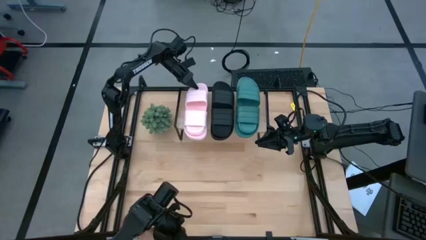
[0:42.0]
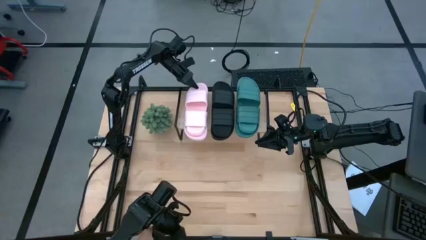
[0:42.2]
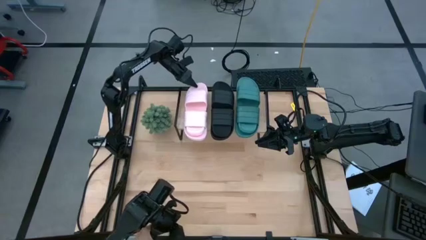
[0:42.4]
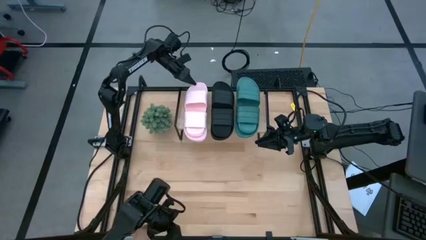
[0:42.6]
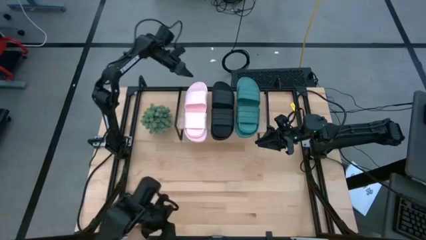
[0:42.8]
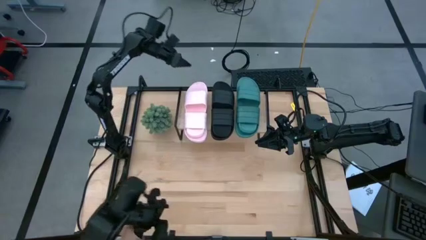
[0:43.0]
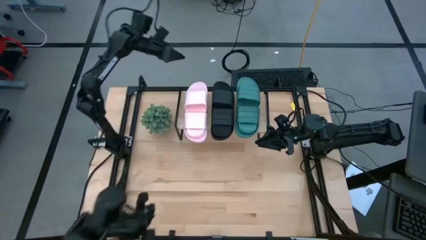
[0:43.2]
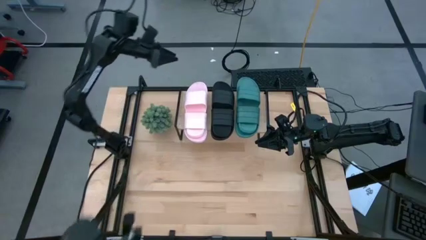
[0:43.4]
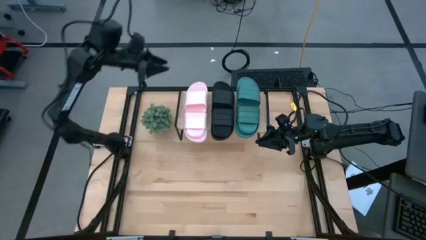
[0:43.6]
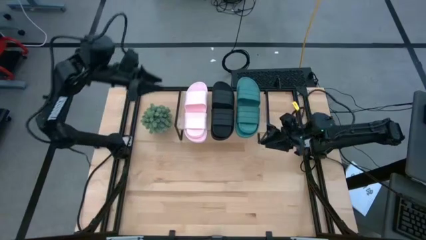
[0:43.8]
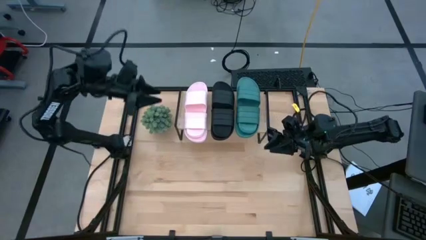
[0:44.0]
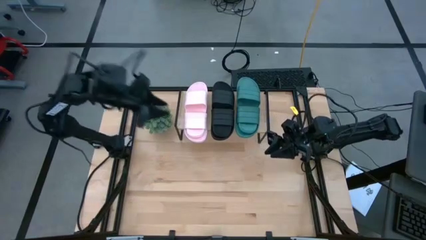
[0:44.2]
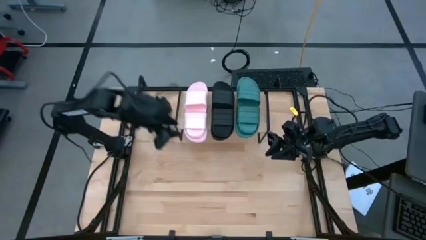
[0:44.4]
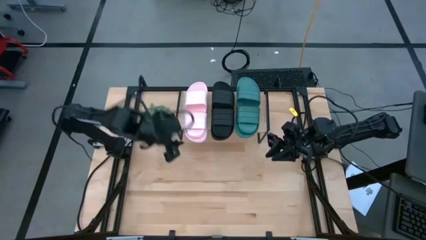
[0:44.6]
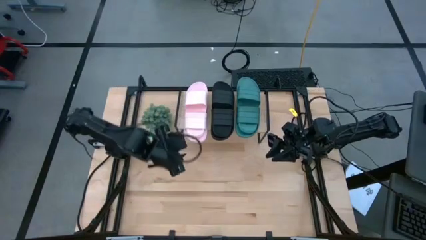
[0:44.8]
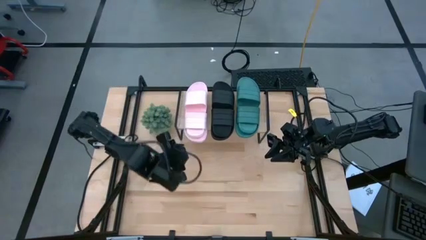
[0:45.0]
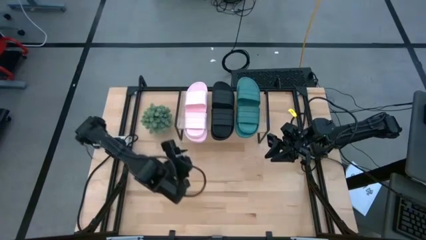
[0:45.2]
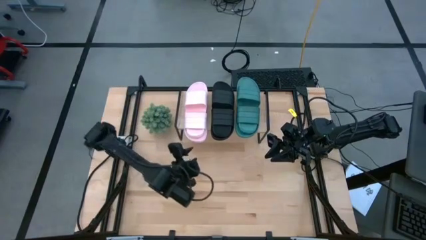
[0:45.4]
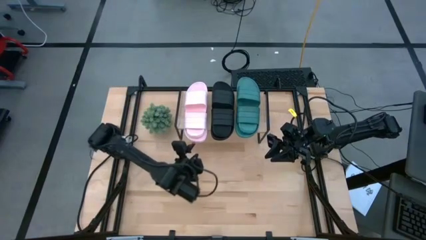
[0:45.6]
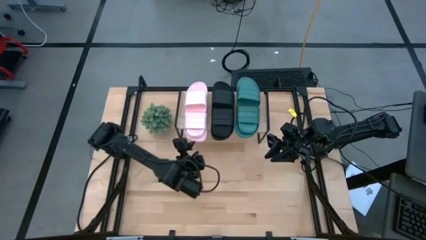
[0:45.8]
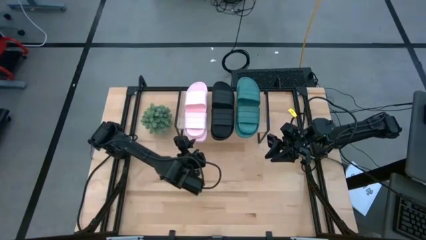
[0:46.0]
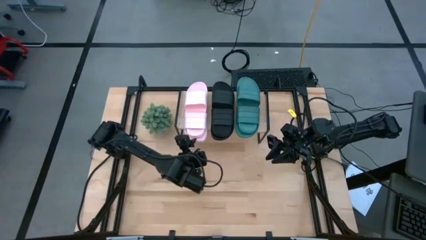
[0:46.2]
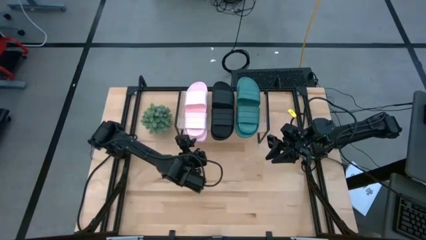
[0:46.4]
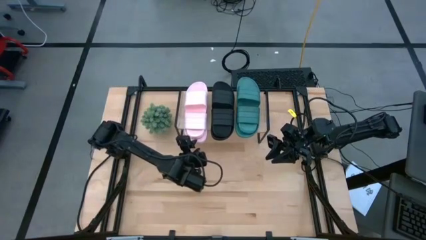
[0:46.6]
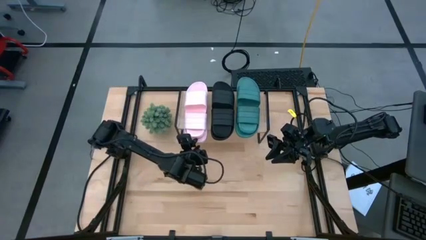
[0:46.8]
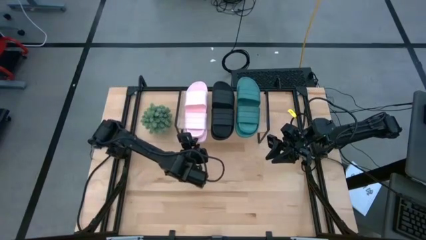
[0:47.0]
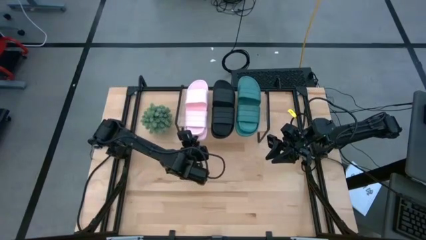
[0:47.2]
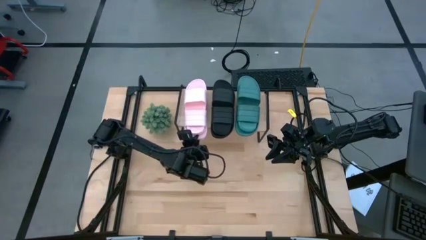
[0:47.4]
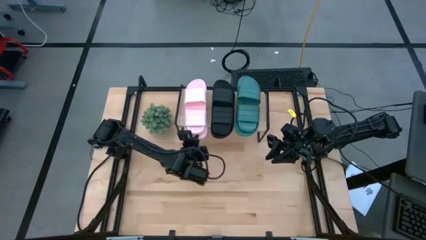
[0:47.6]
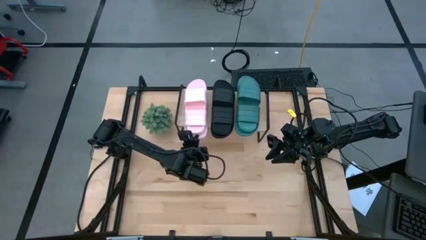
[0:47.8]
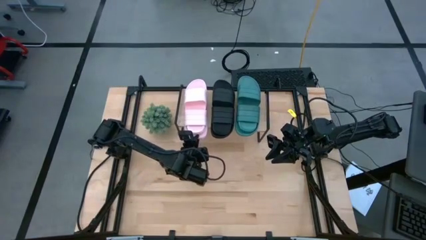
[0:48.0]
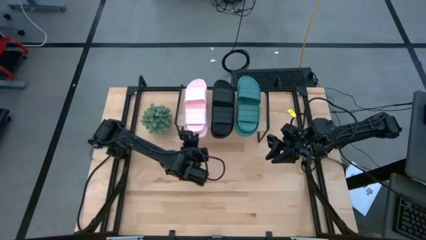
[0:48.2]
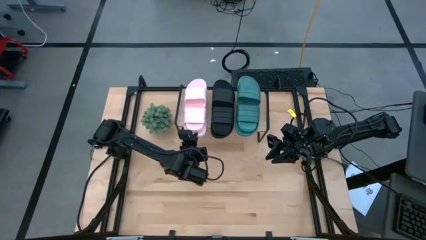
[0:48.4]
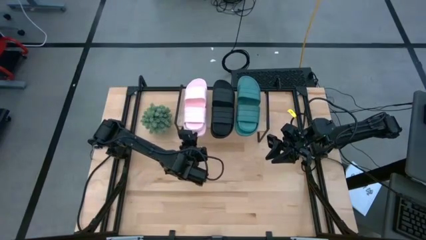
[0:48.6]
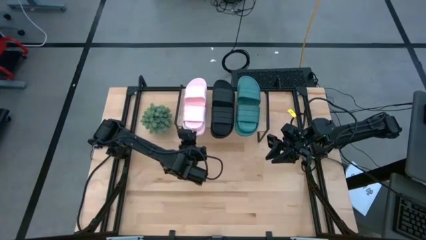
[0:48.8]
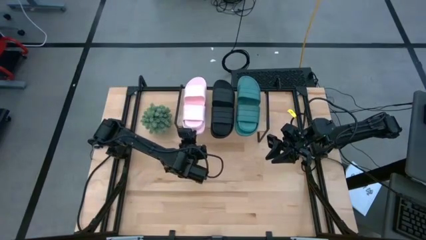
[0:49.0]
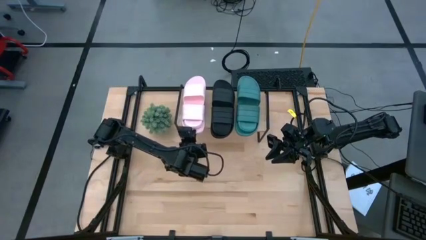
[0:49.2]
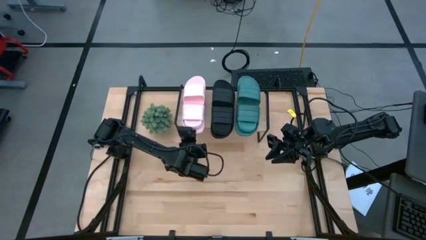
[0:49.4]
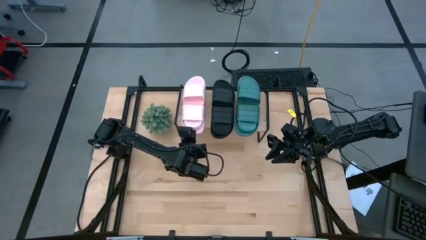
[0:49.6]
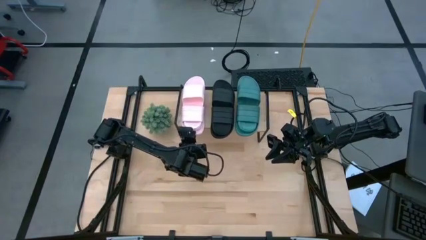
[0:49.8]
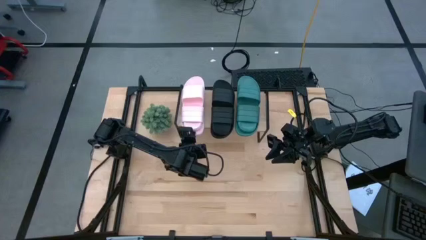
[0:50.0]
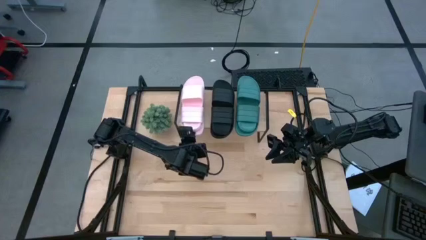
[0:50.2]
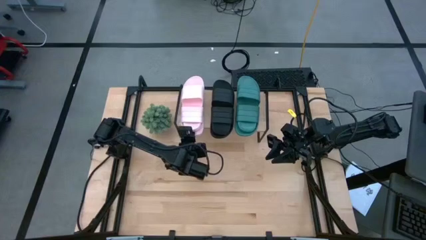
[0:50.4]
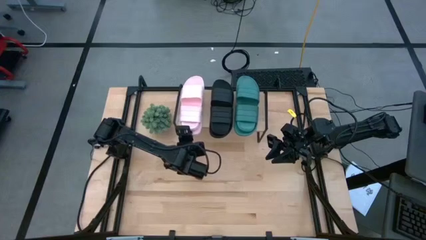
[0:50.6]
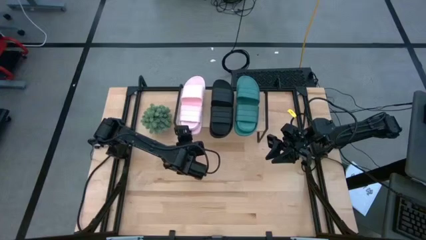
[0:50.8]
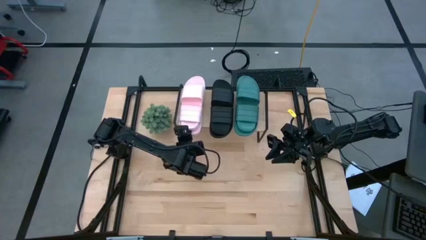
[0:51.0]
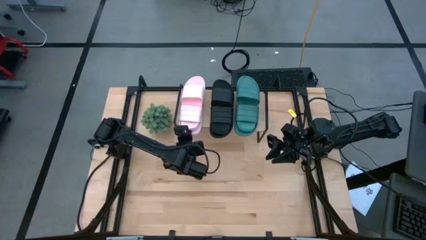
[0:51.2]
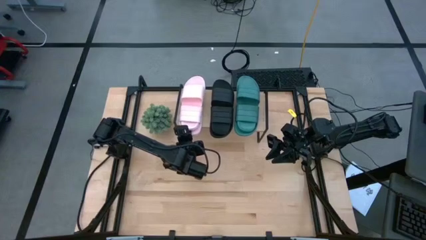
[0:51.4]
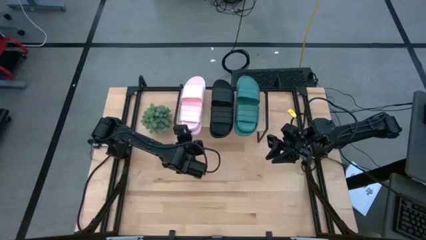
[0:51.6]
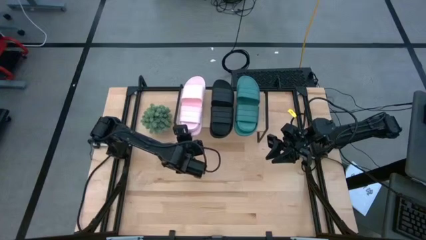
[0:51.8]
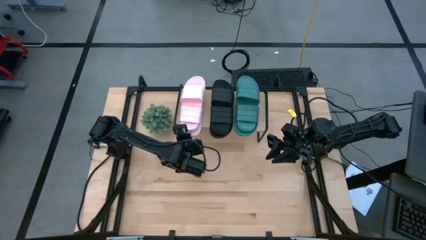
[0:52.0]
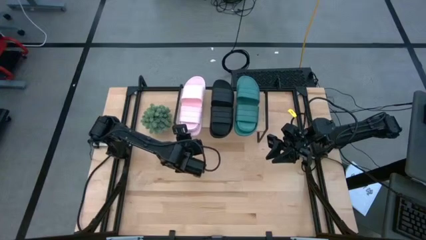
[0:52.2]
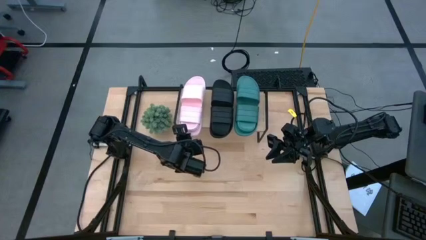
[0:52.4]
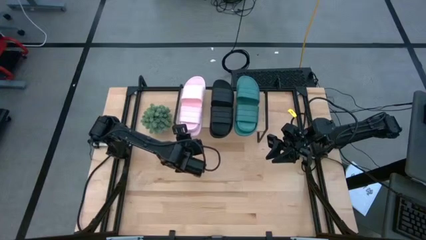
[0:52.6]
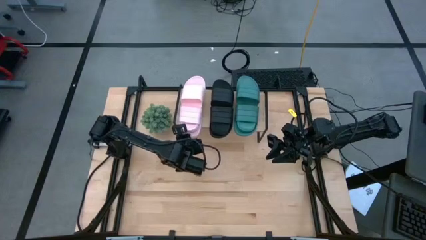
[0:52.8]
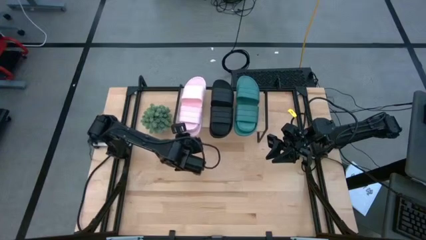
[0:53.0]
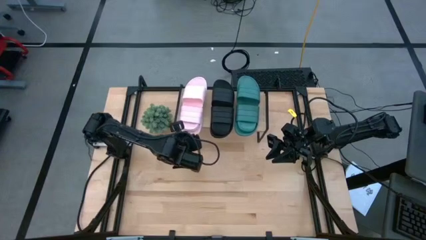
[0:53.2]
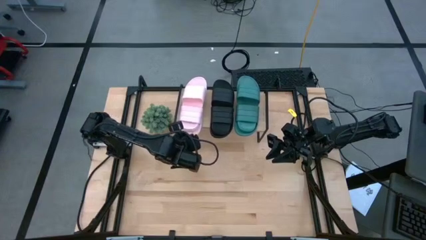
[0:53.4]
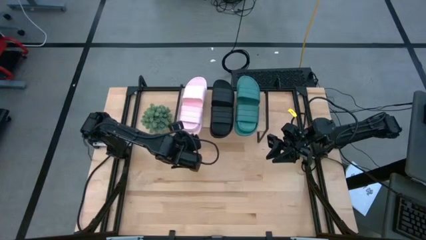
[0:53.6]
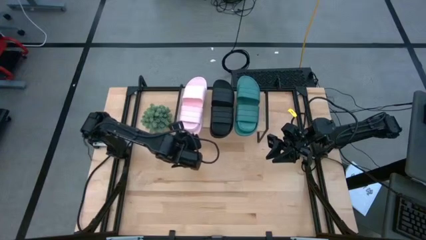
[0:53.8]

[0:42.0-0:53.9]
Task: Pick and place slides into the shelf
Put the pink slippers on the shelf
